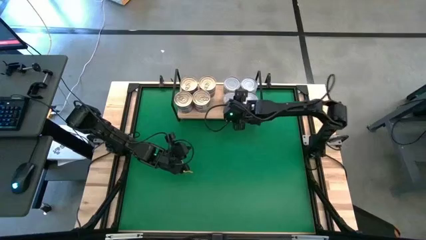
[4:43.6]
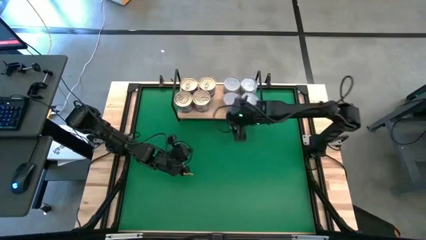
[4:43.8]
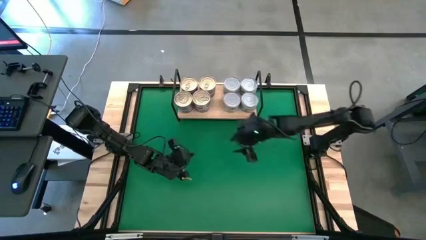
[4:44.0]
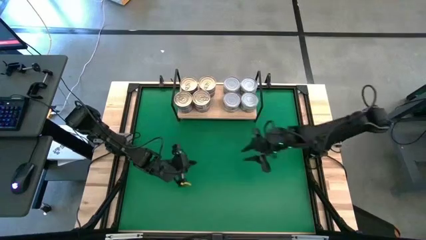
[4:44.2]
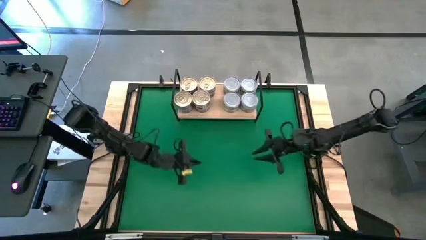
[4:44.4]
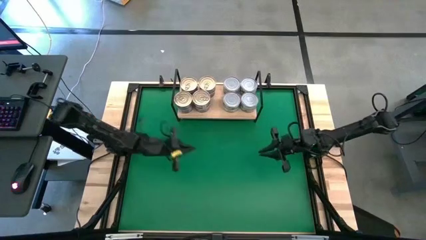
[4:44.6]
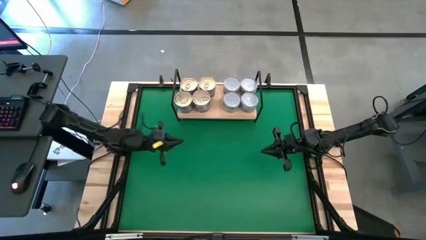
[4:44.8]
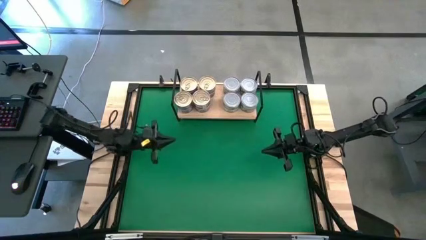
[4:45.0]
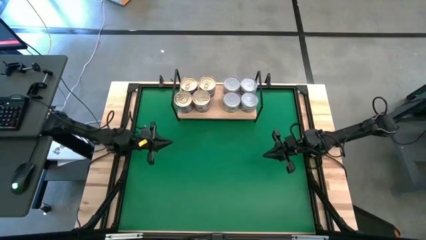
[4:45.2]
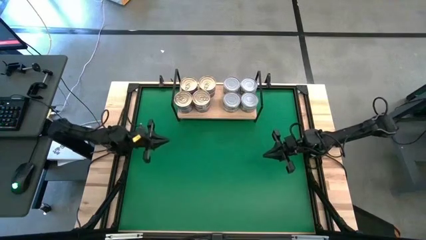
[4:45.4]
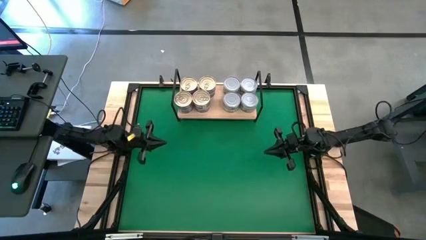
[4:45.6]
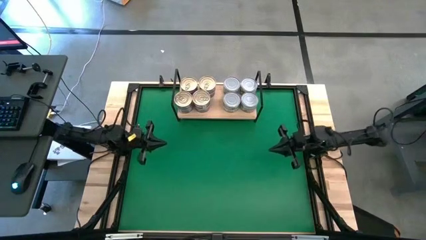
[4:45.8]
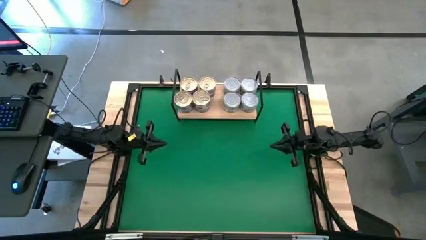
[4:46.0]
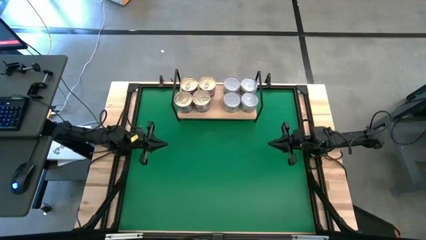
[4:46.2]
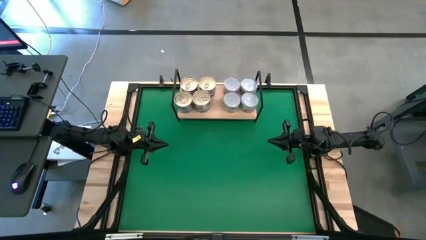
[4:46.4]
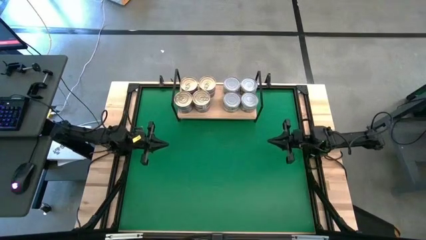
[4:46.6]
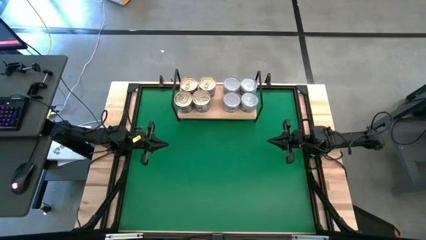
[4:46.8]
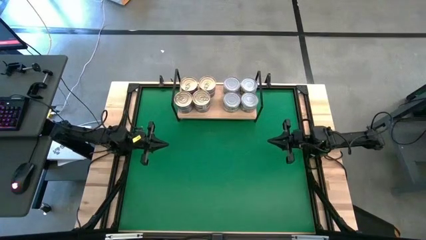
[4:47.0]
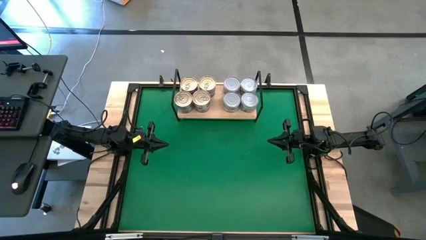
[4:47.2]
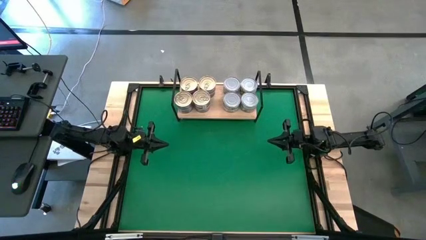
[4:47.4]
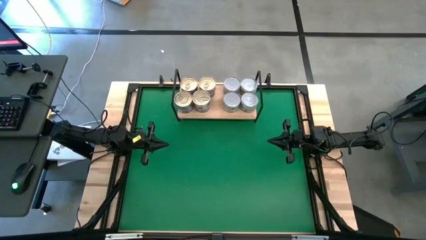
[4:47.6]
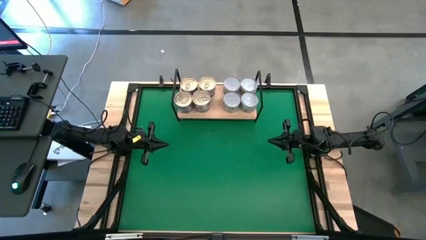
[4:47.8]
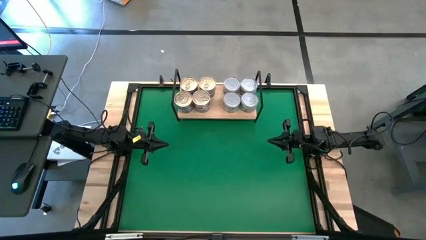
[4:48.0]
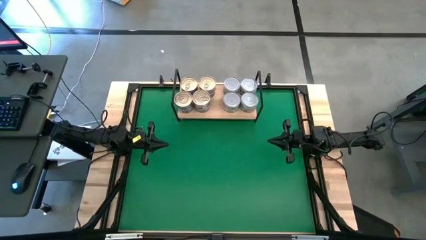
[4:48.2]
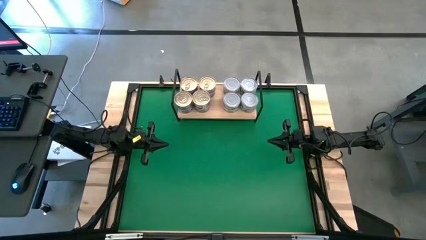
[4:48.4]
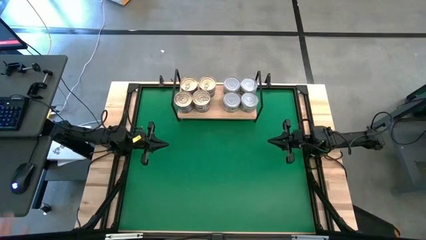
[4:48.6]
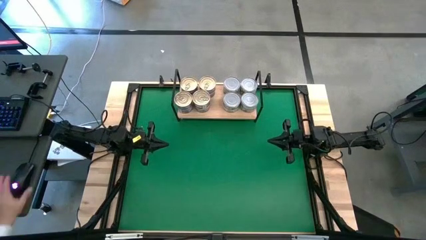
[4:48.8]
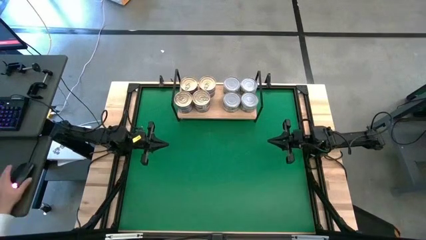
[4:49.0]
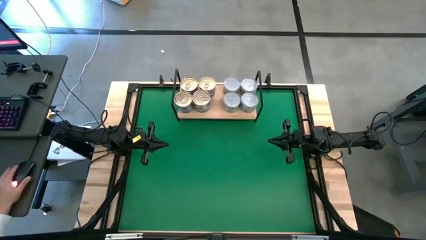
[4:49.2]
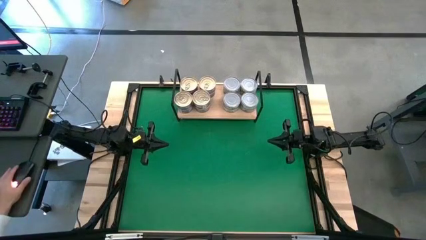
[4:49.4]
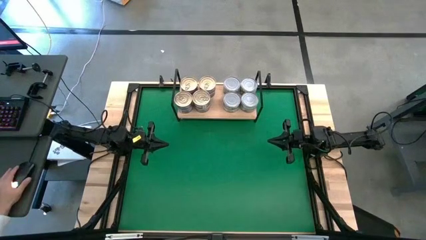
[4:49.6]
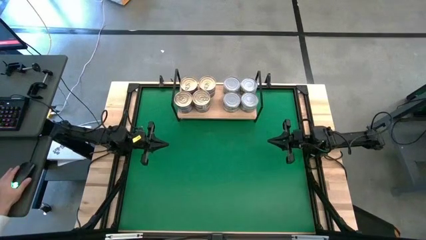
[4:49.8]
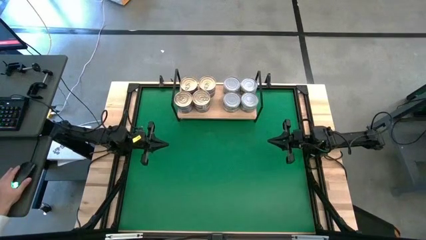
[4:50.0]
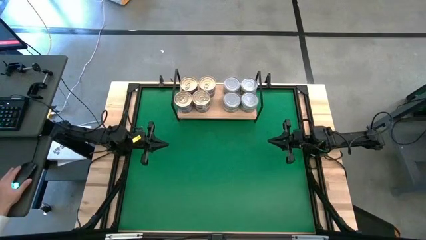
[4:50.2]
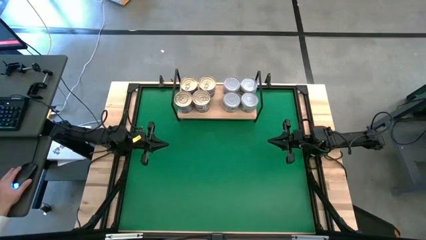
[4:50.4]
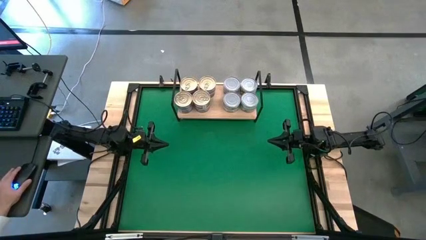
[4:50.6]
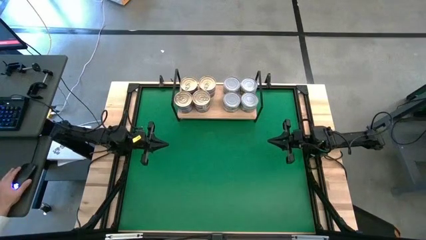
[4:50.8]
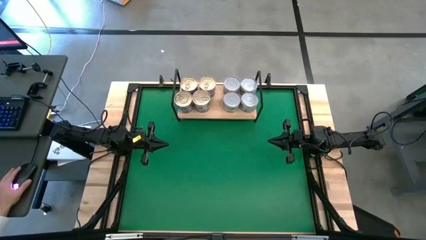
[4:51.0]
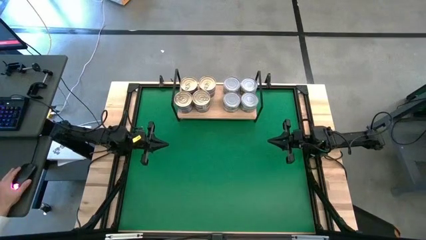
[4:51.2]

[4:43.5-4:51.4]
Task: Stack canned seafood by type on shelf
Return to Home Position

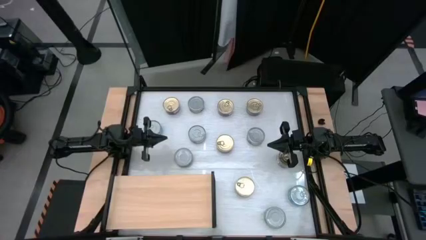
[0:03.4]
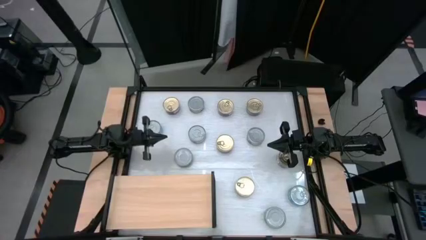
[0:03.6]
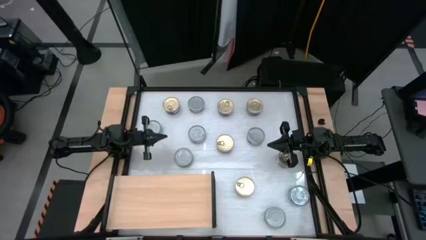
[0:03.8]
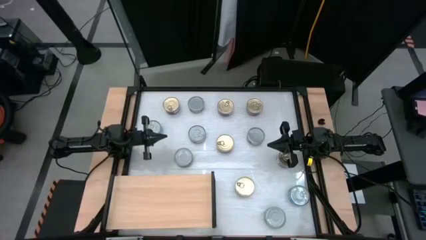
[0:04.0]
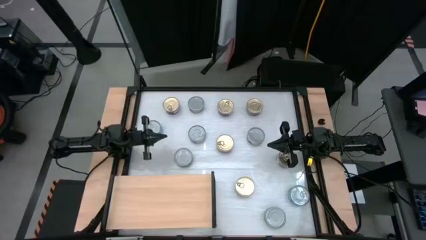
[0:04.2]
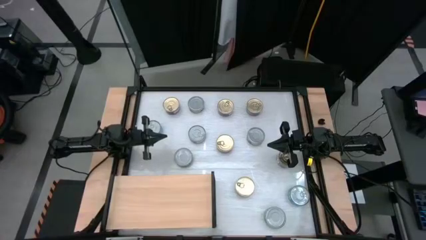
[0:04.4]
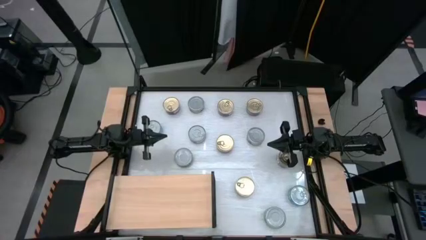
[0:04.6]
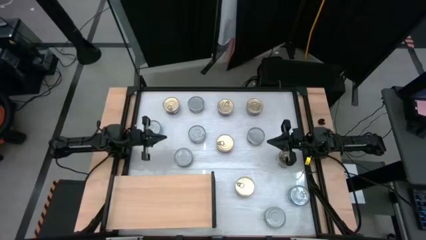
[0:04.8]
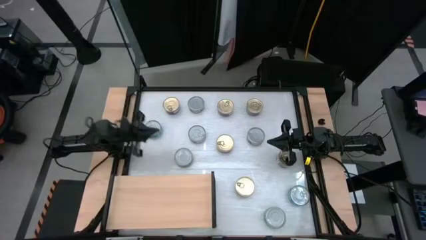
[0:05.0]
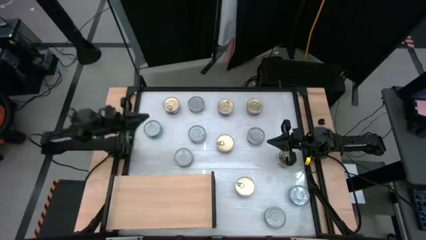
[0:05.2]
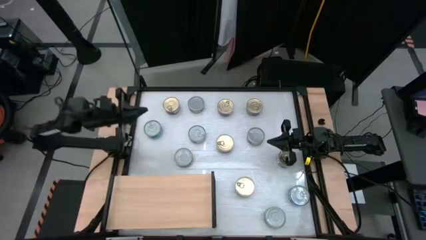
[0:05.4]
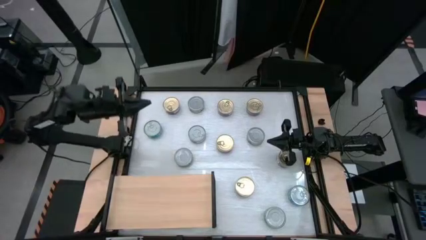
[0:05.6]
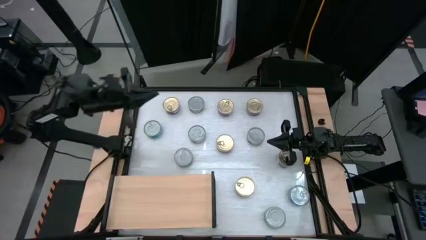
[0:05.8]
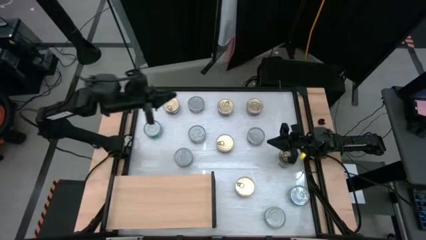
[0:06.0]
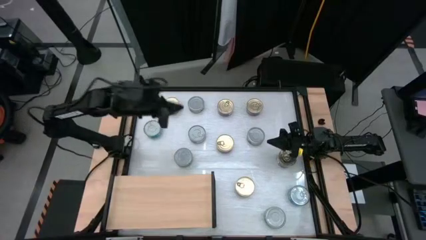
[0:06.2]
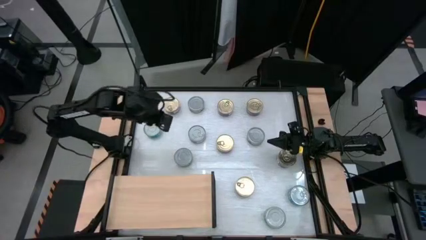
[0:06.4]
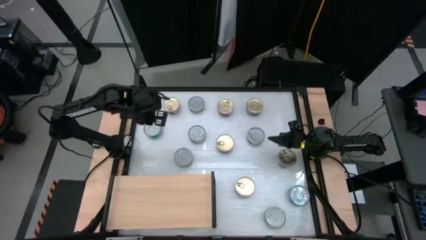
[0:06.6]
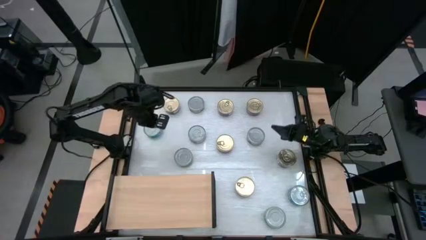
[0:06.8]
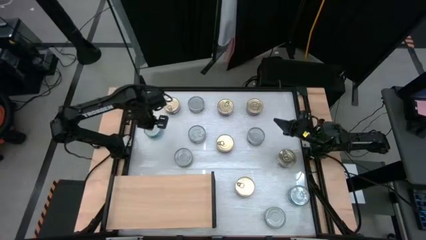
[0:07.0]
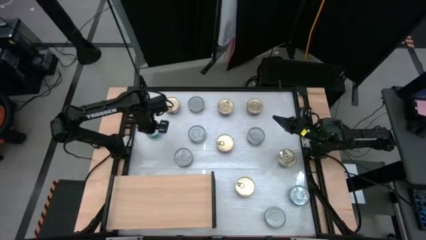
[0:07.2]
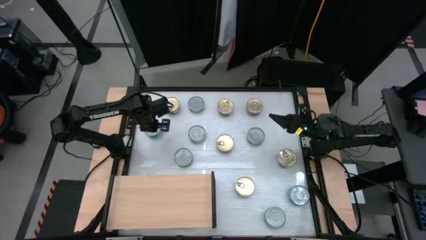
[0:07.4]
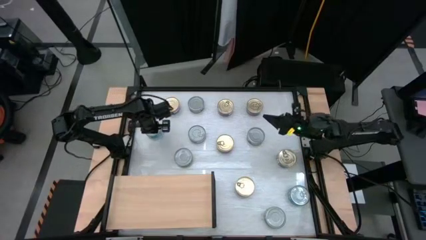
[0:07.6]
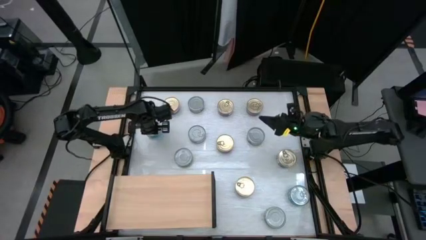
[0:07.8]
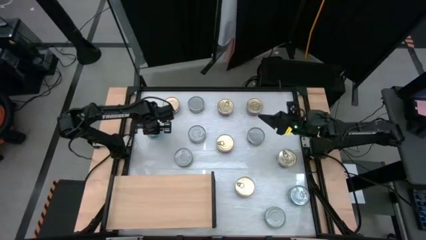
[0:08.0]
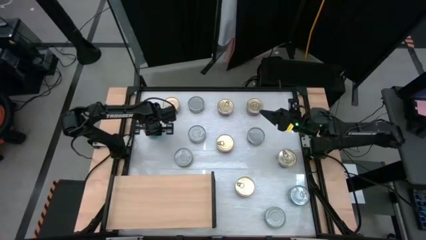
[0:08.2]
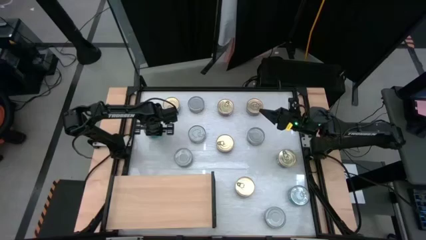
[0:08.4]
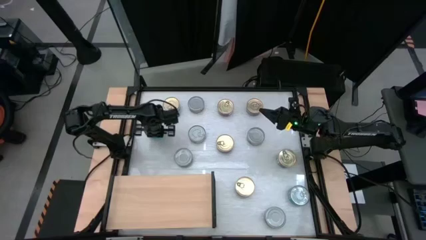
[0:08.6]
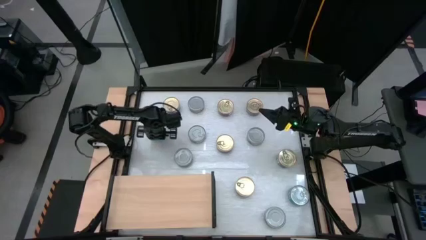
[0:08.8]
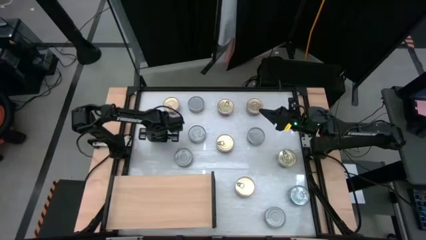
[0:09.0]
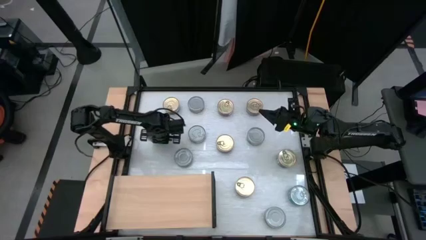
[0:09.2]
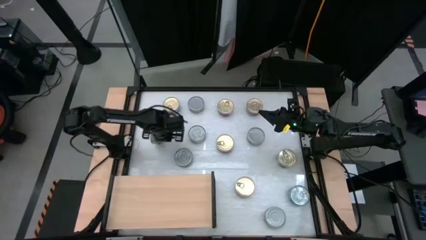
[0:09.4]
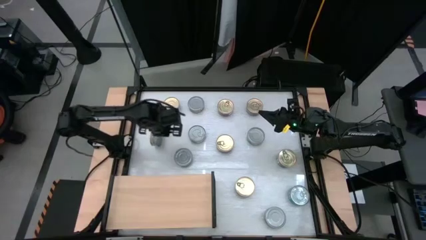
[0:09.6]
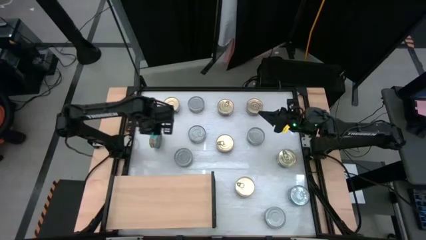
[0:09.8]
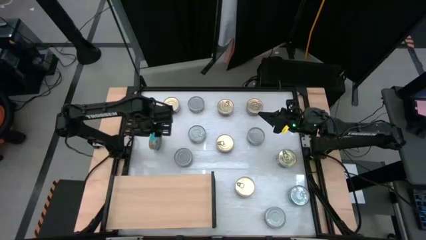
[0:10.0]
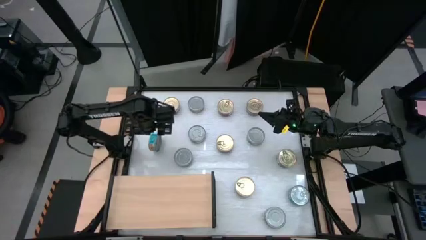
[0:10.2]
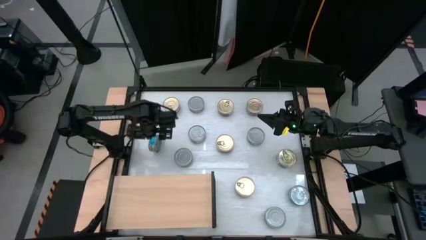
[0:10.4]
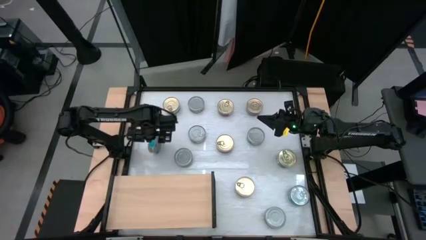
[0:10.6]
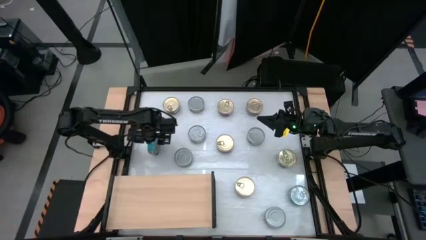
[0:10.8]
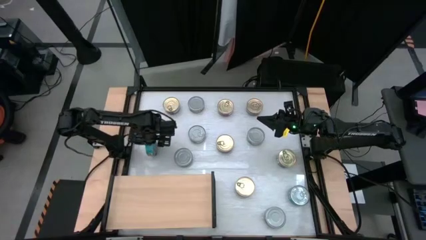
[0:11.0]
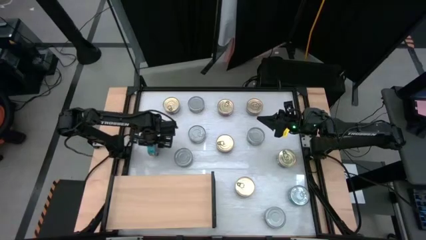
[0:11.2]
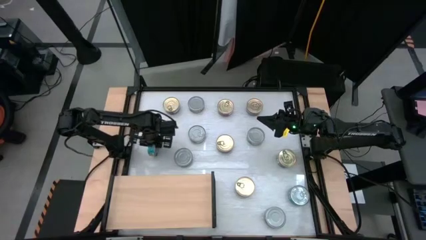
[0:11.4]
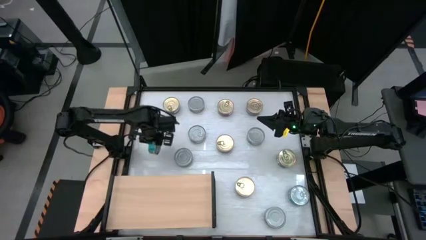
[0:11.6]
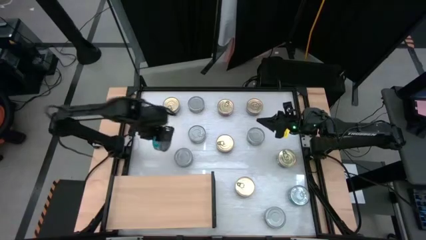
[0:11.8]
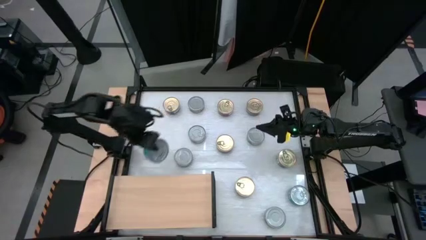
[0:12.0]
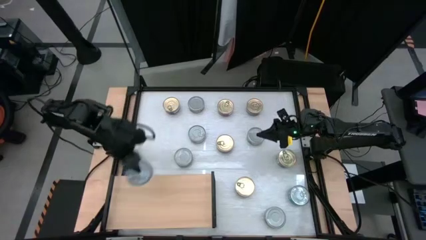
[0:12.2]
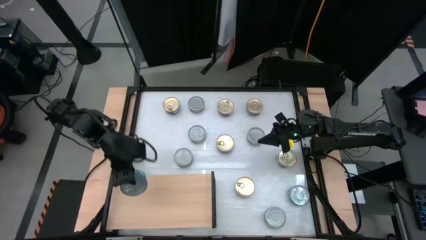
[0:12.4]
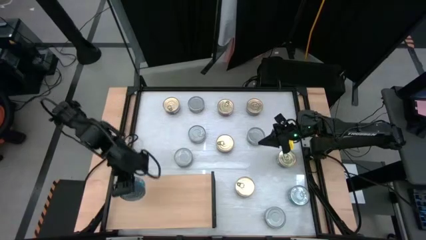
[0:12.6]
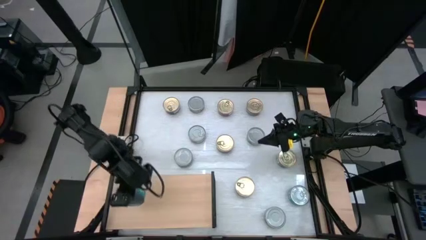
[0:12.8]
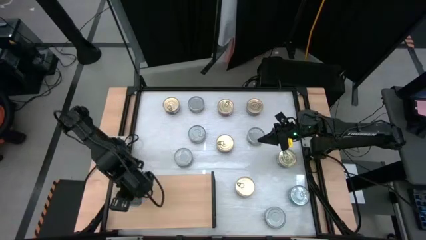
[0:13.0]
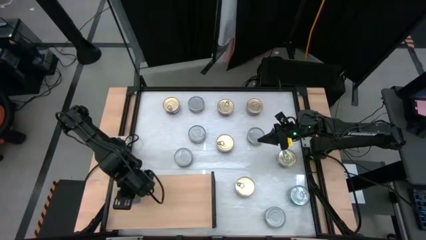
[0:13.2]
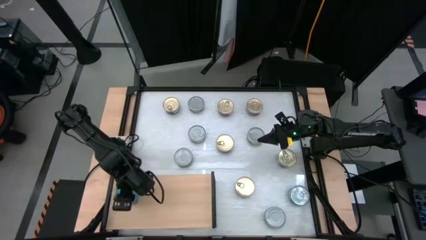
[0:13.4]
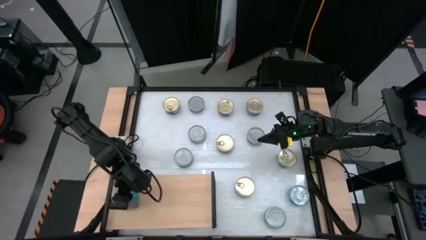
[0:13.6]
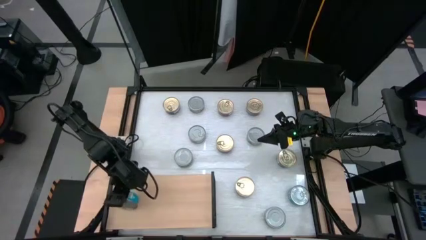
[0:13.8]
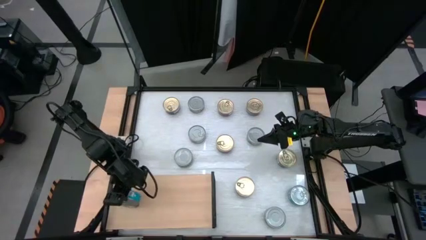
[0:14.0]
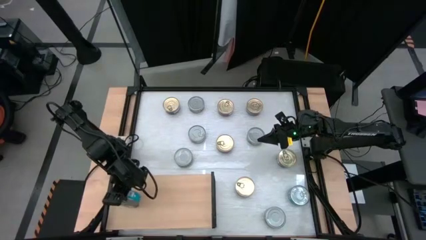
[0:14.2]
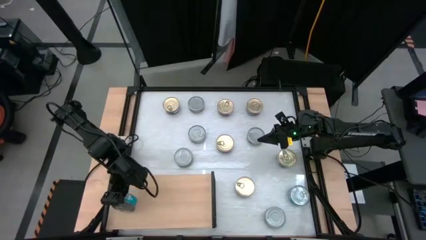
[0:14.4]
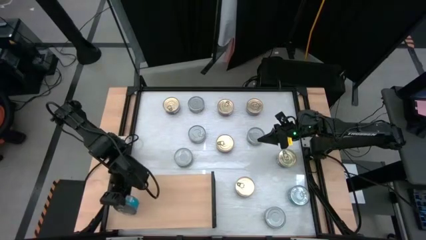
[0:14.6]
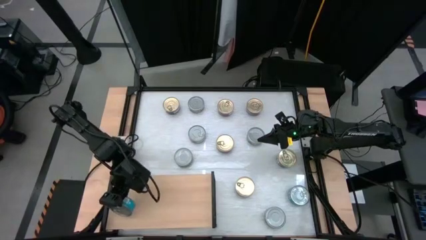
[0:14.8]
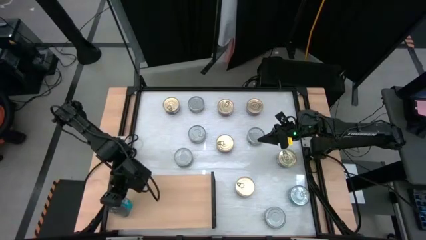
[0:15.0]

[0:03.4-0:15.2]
Task: Stack canned seafood by type on shelf
Put the top right yellow blue tuna can on the shelf
